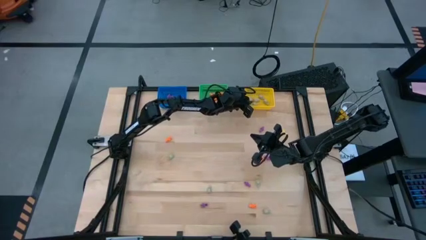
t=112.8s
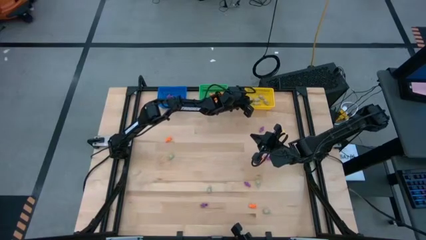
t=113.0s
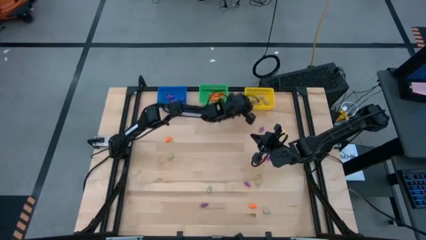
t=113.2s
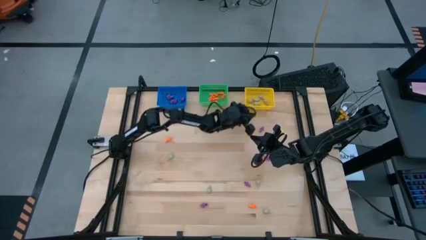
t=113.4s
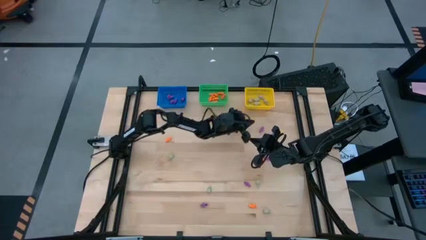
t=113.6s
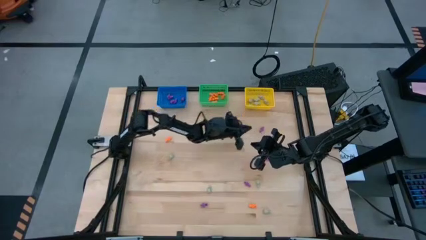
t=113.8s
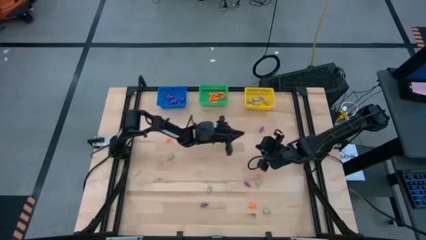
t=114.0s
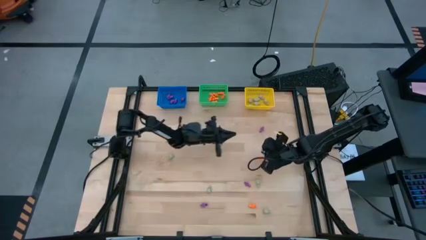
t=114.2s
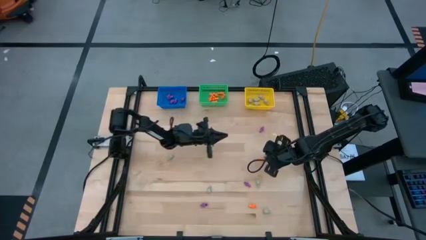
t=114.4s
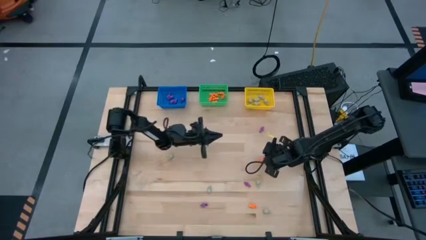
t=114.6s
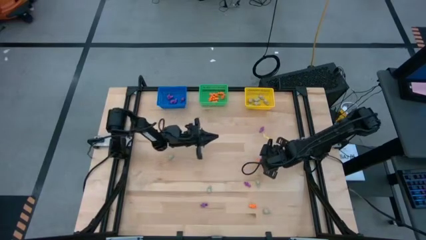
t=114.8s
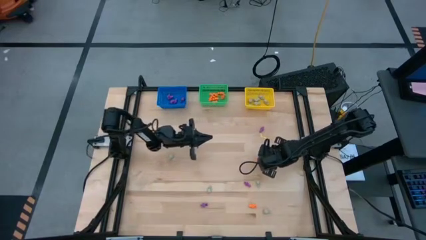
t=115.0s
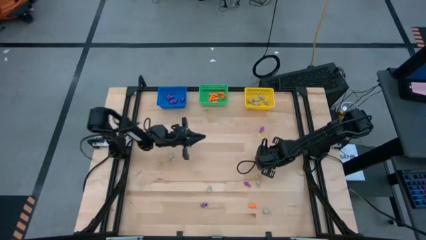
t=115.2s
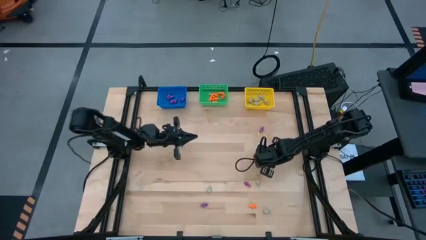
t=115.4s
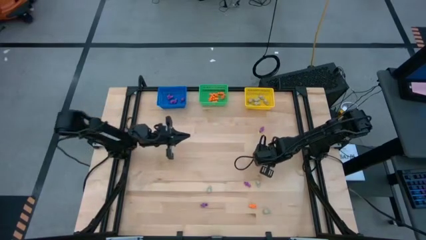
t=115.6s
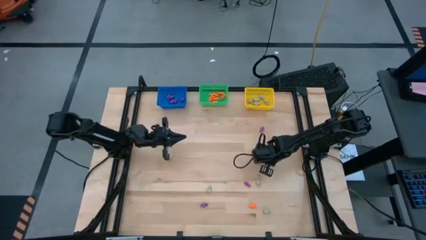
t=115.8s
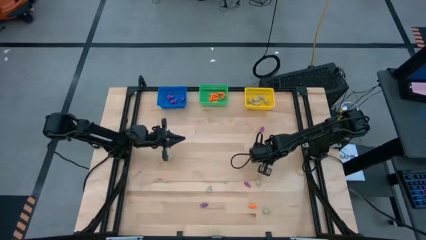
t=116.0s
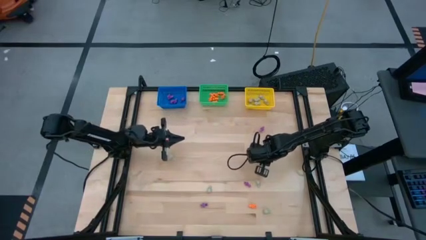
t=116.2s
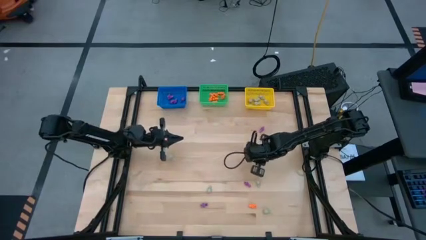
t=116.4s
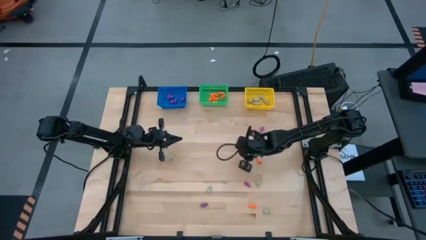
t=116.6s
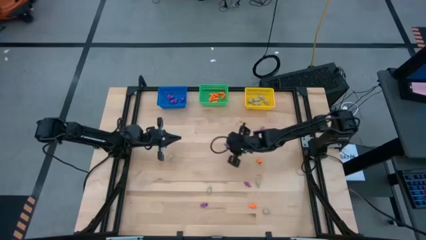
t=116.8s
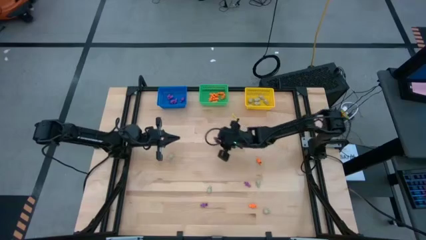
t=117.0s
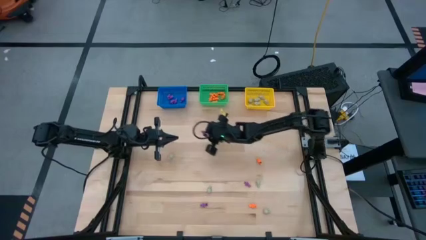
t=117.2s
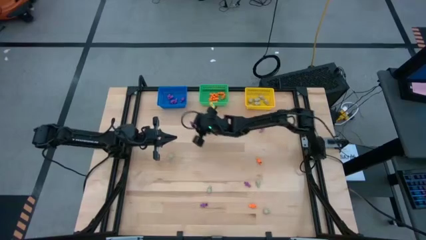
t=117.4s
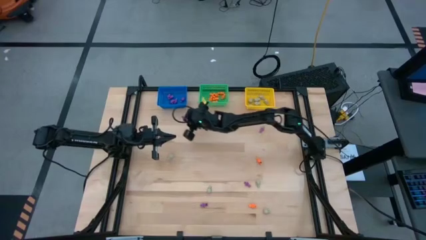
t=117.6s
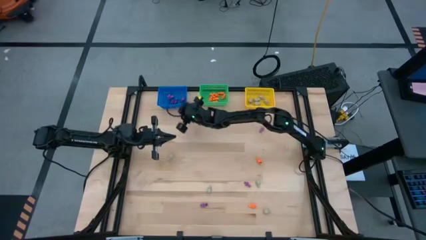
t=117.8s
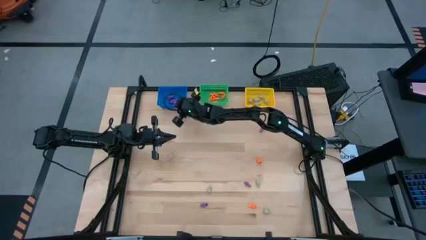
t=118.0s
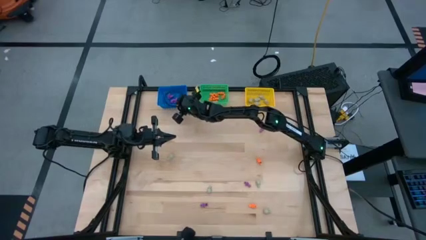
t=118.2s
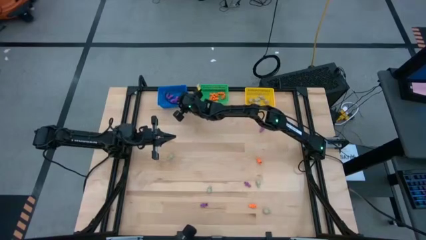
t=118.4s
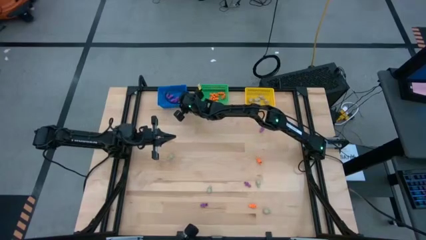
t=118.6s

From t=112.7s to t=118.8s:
Task: Sort Halloween decoration
Put the purple skeleton toy into the blue basket

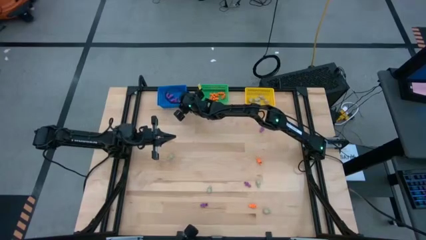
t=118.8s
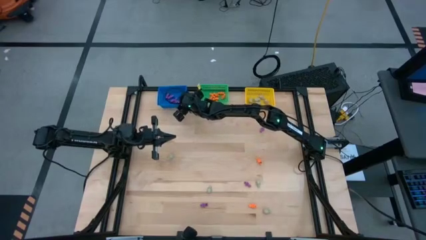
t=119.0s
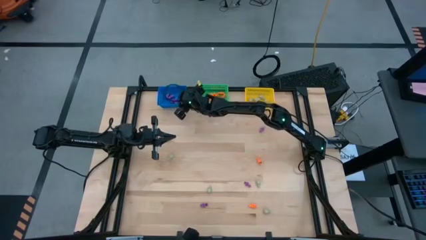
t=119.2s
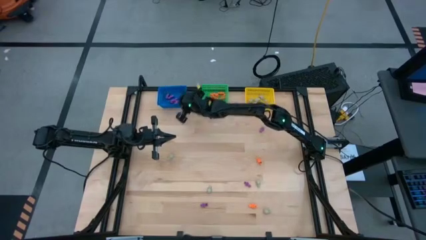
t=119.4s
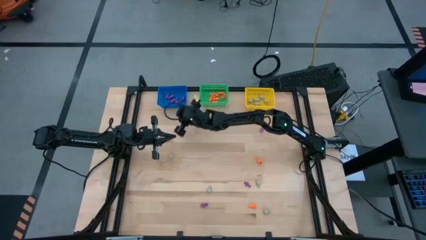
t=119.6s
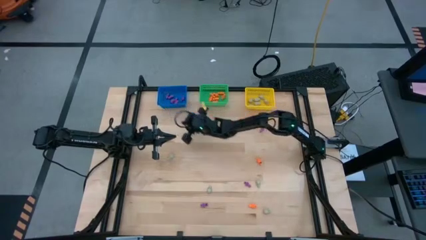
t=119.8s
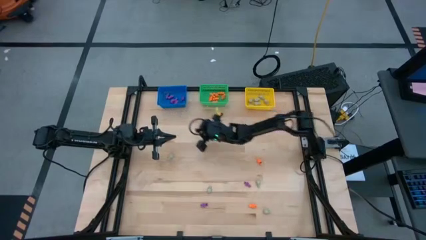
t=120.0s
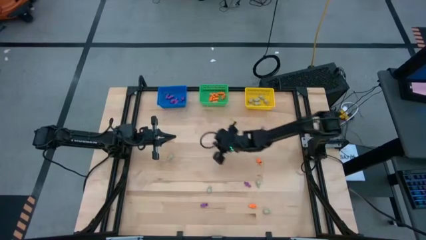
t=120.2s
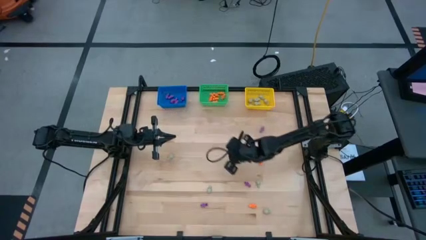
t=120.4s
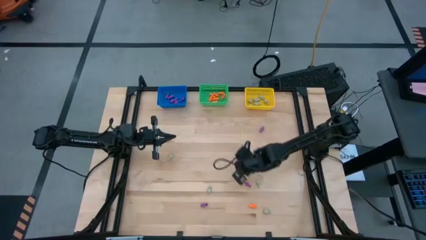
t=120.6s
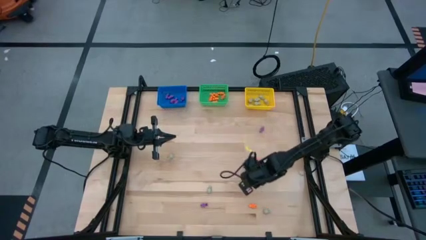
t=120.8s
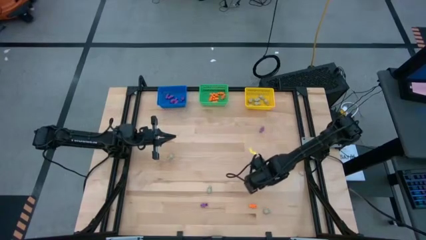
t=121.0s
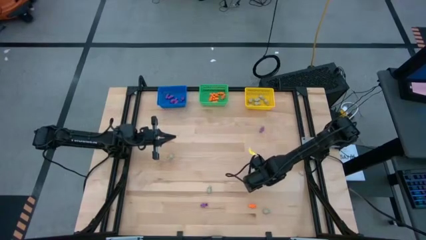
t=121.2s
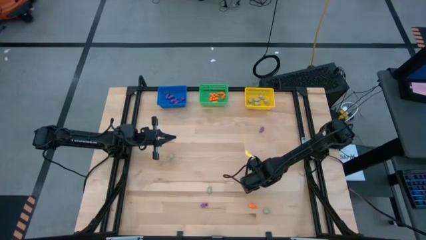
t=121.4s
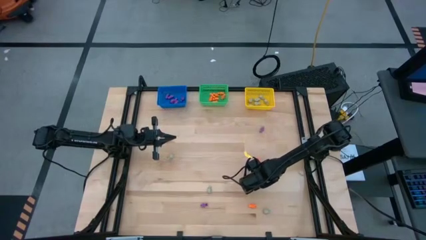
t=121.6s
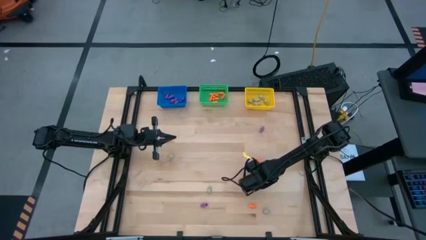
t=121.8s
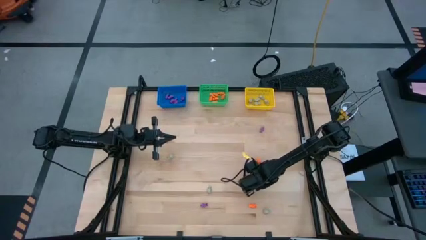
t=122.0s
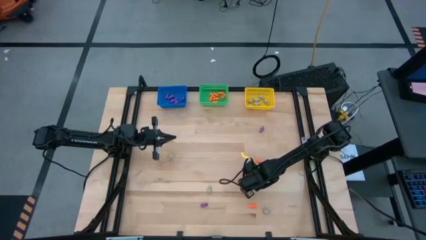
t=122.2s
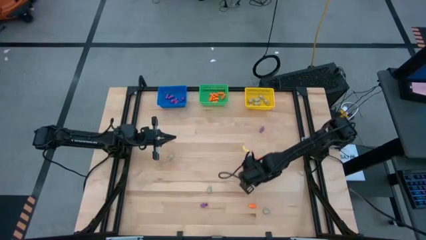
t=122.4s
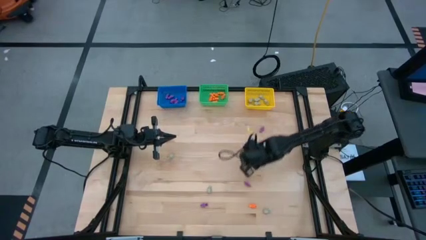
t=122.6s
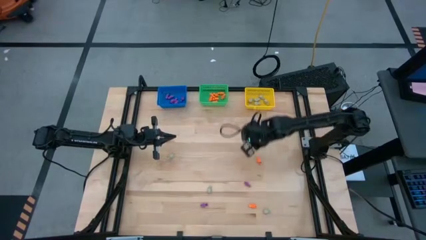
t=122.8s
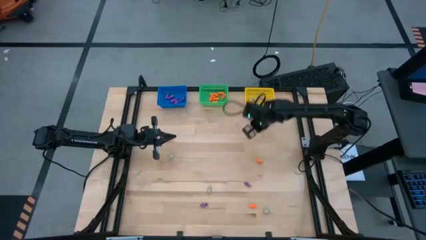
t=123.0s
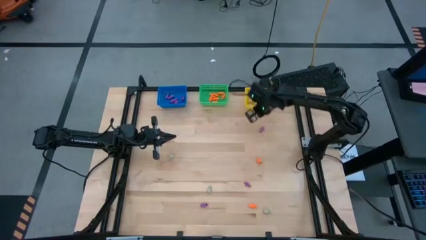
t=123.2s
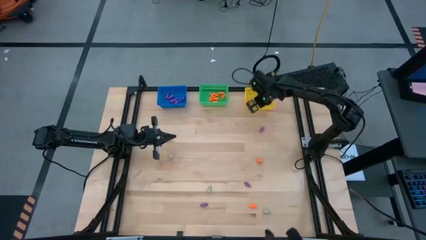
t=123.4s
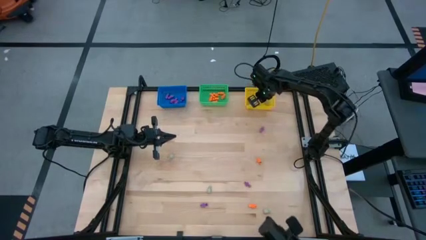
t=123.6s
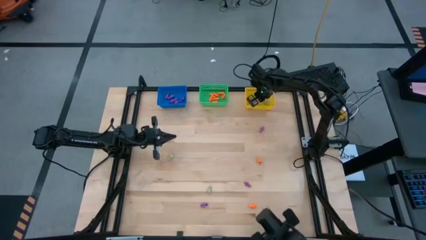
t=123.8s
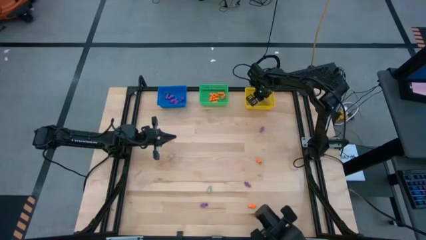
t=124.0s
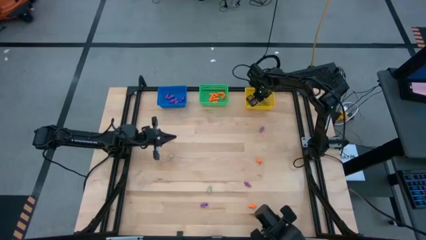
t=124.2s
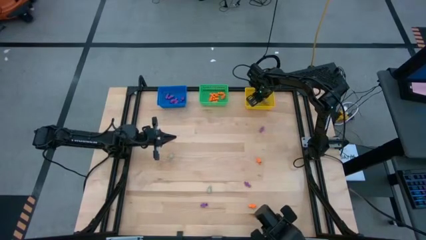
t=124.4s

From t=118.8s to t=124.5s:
Put the grey skull toy into the yellow basket

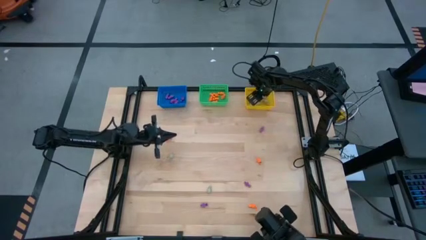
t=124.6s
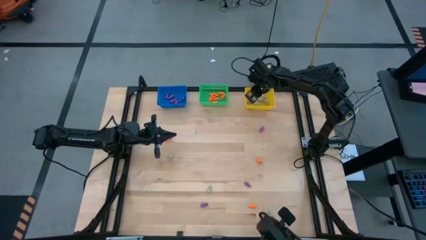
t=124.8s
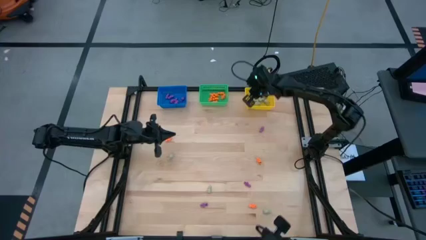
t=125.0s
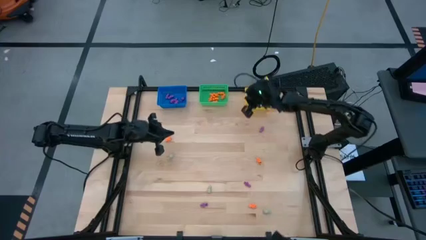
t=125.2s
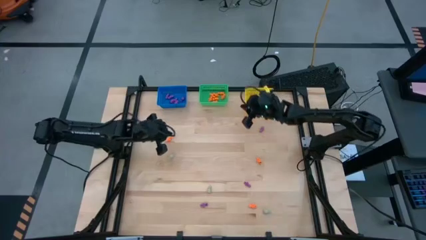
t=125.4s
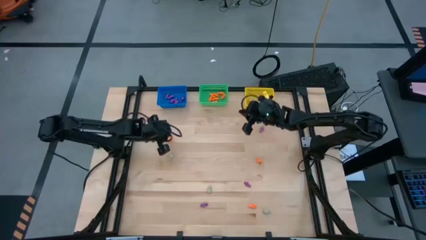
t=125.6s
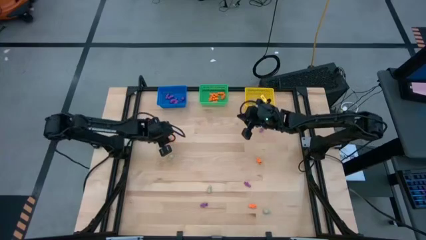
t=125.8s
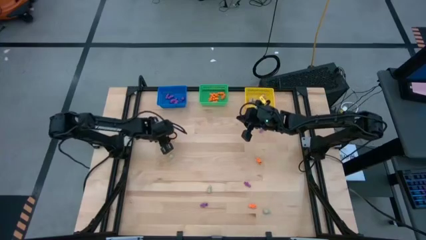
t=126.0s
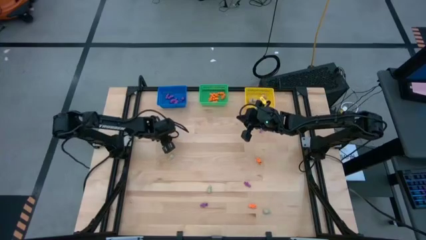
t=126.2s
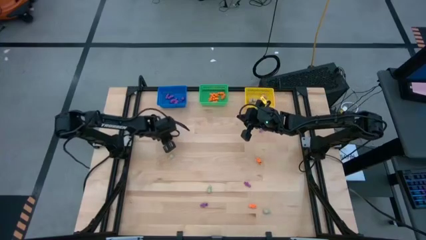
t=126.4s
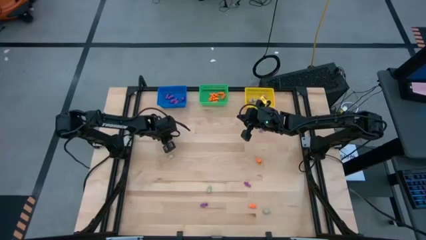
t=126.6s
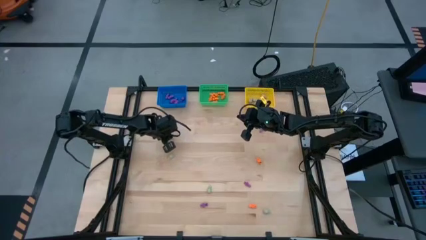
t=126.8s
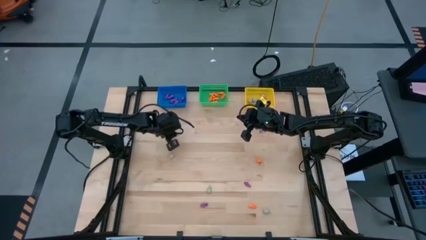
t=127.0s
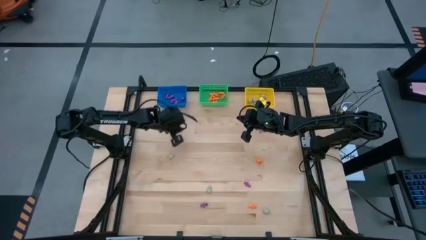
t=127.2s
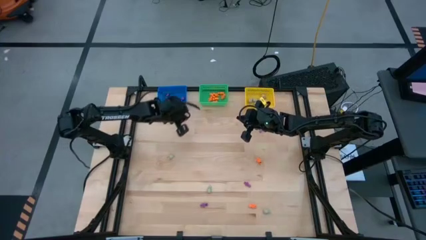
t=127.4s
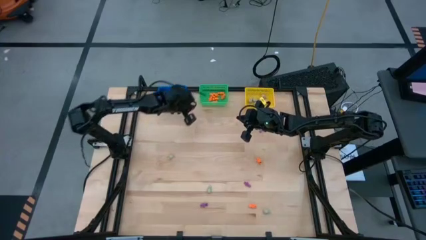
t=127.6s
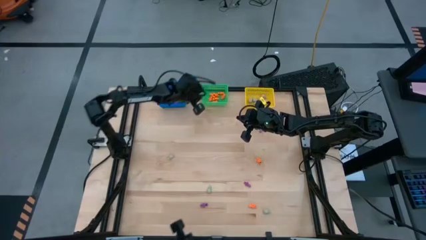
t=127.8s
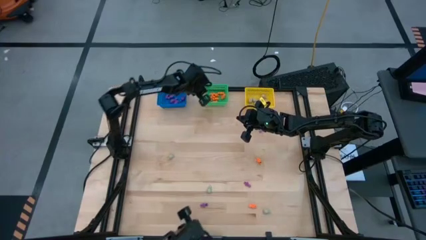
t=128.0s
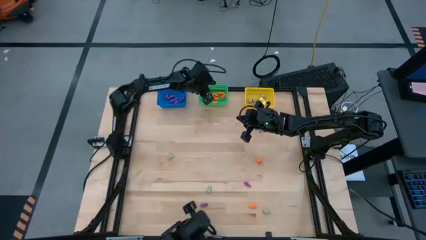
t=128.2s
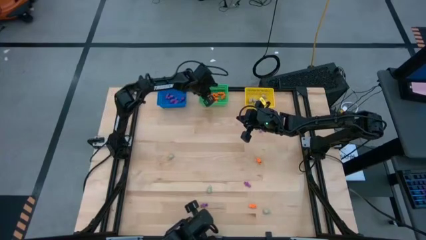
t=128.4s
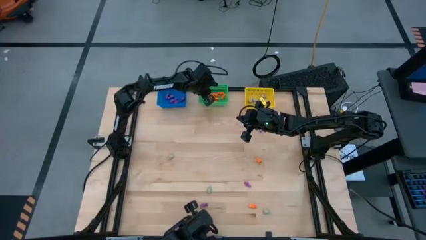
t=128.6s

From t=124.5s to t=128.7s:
Put the orange skeleton toy into the green basket
